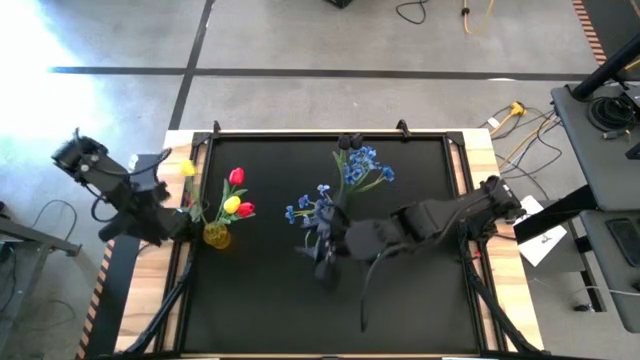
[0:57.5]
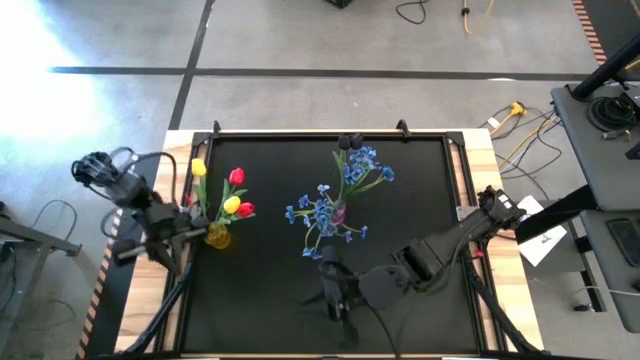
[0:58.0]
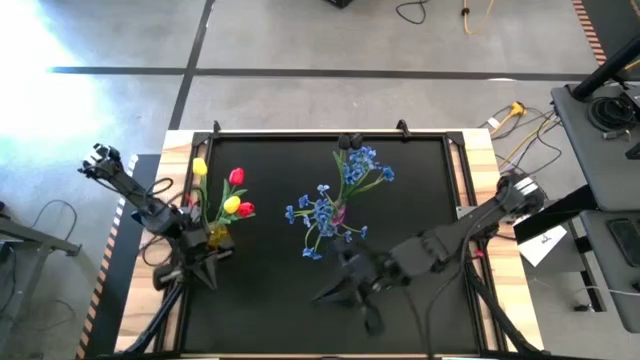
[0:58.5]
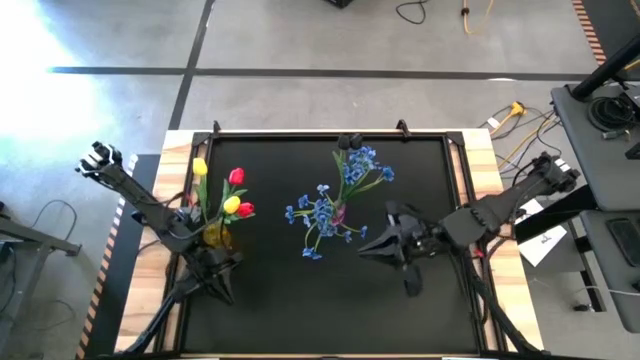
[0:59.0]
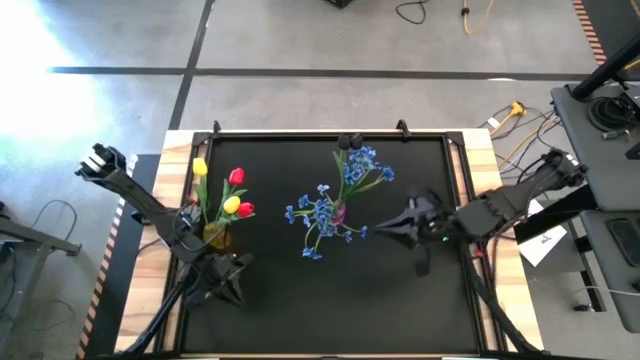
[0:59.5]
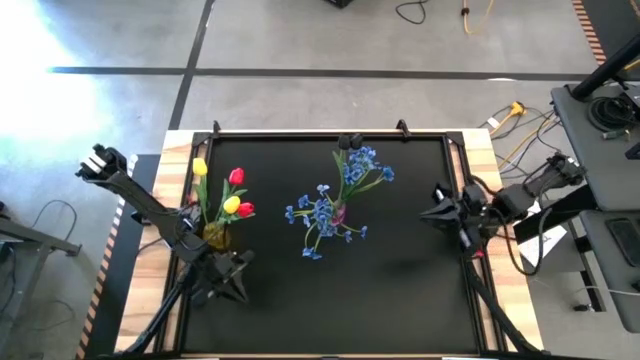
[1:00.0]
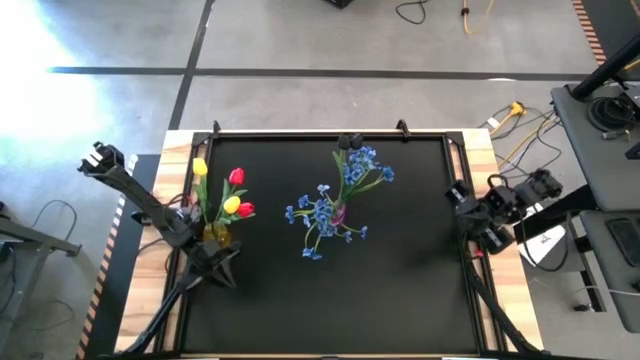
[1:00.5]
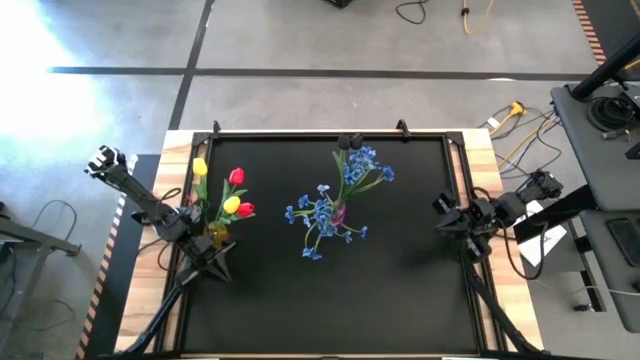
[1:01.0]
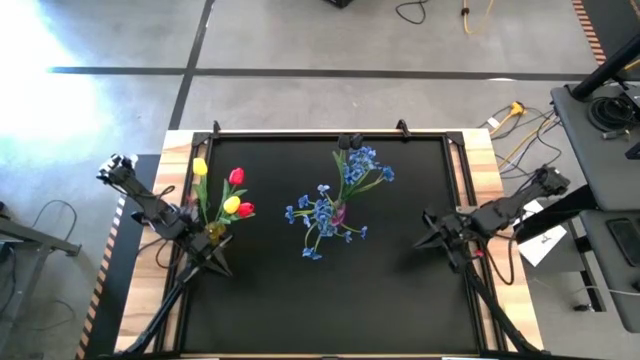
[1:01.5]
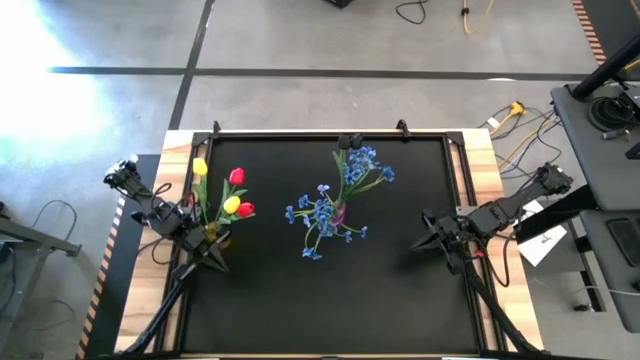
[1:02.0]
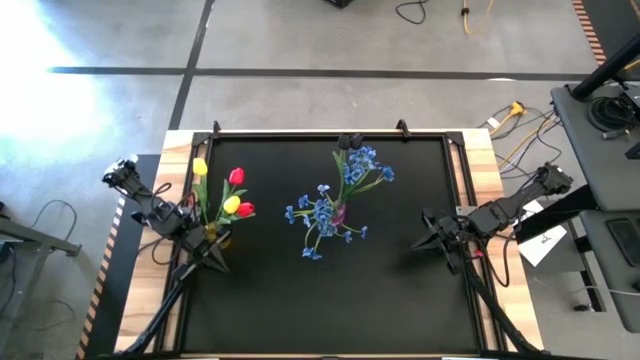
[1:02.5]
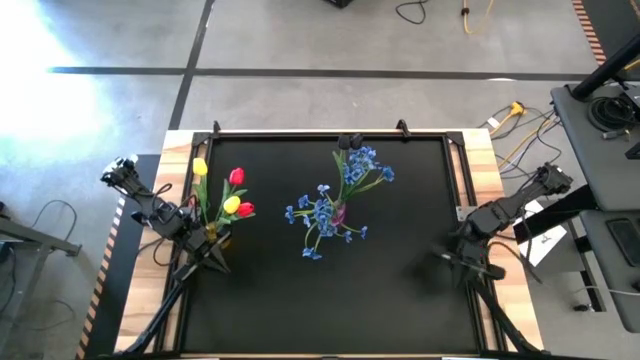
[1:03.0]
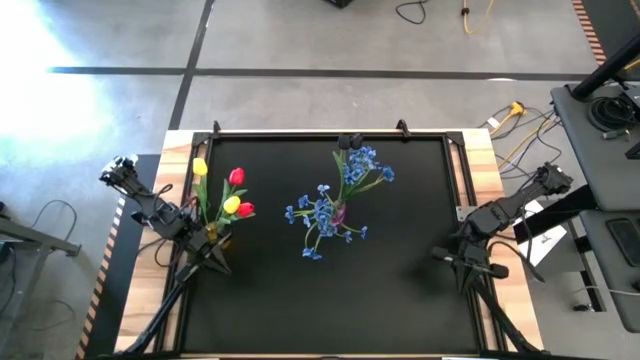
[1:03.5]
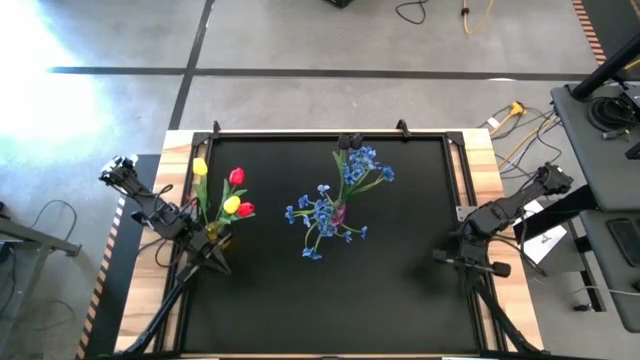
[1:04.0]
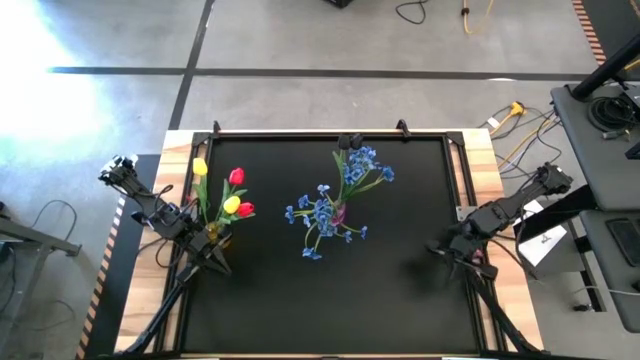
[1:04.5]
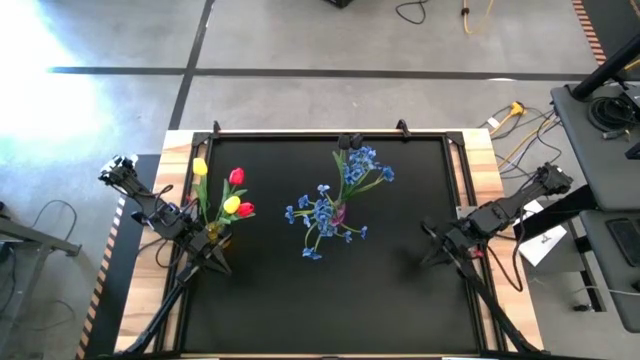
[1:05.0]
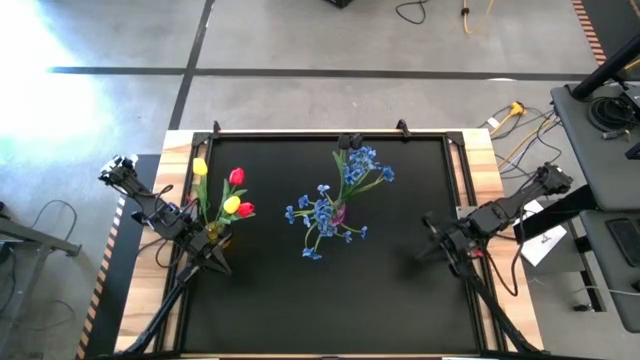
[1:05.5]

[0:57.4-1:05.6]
Task: Sort flowers into vase by color
Return to Home Position

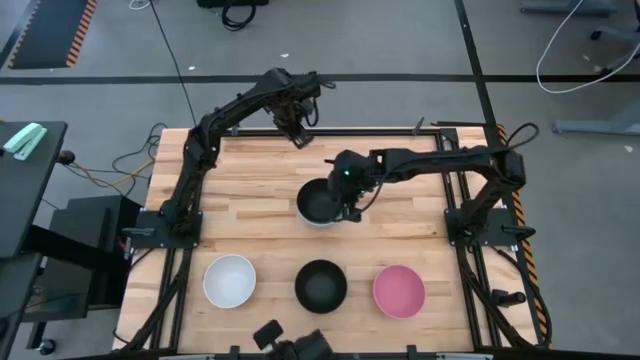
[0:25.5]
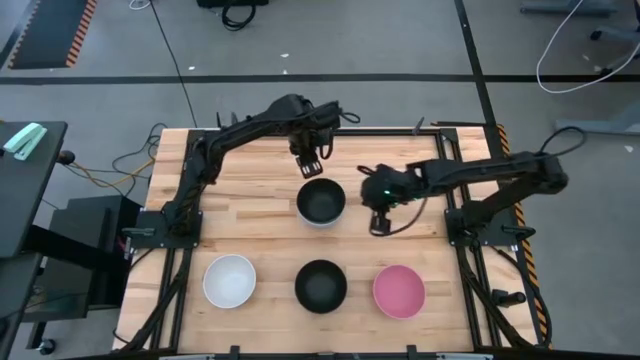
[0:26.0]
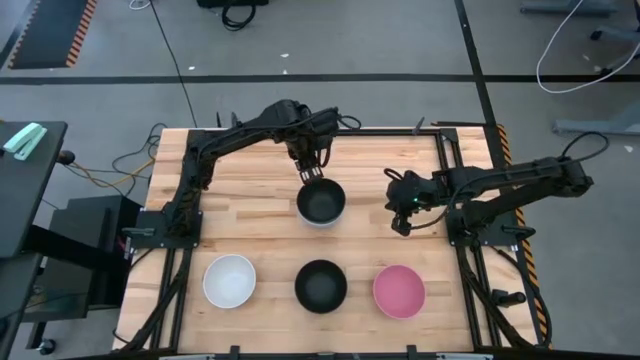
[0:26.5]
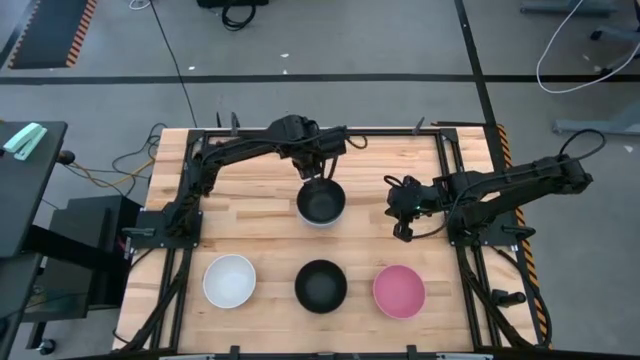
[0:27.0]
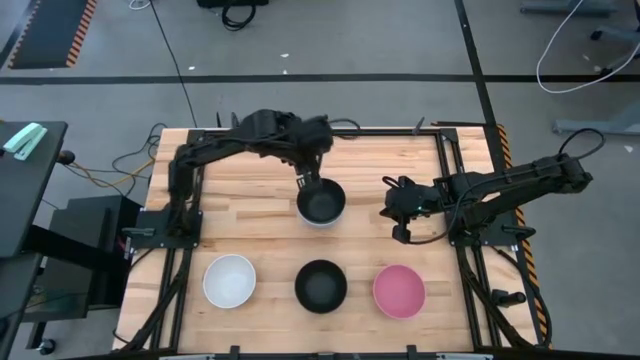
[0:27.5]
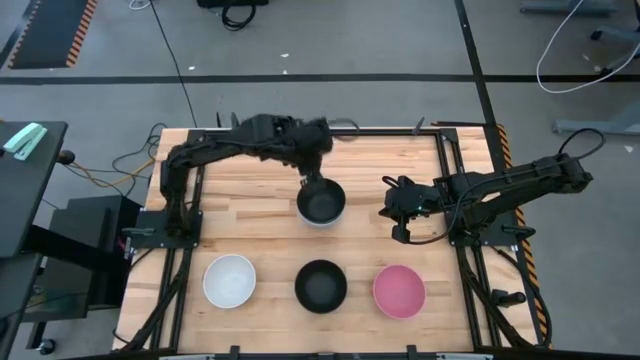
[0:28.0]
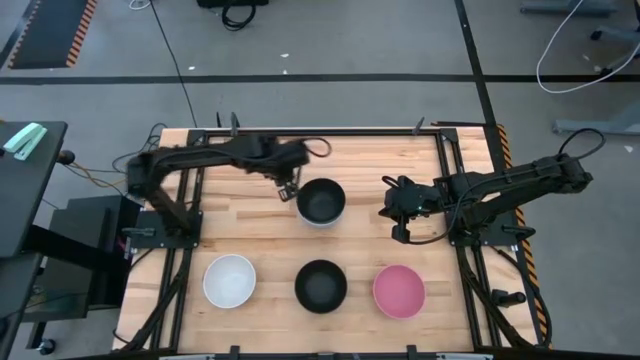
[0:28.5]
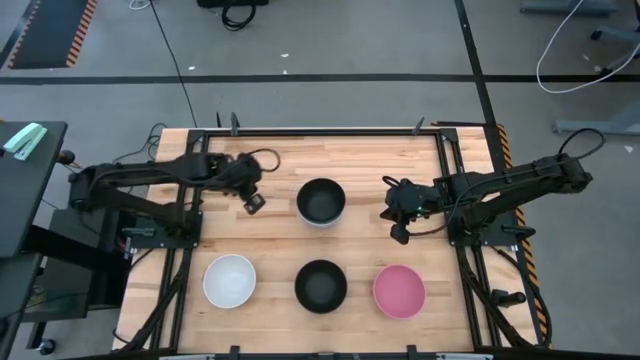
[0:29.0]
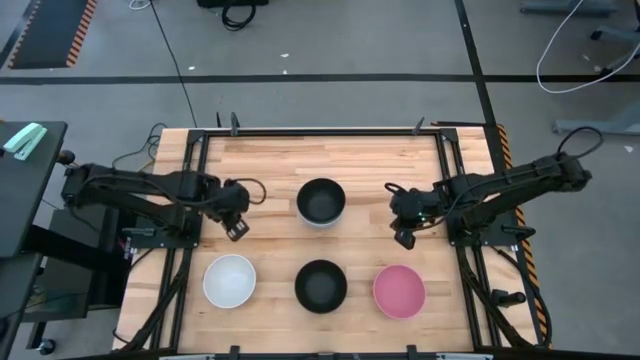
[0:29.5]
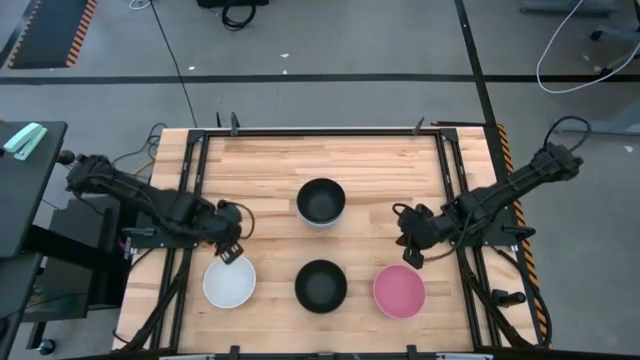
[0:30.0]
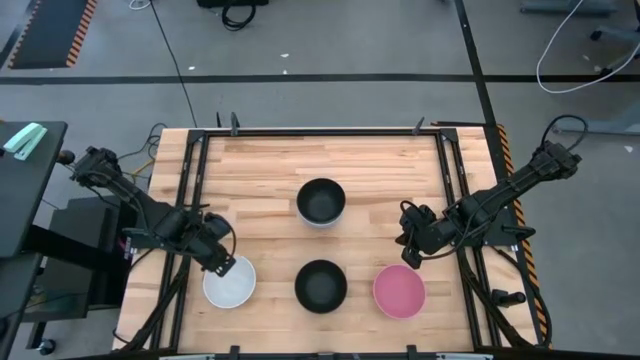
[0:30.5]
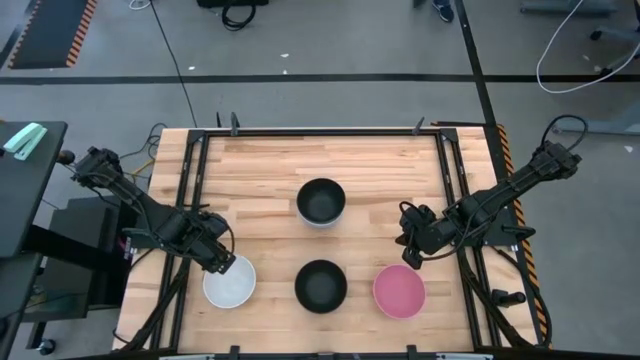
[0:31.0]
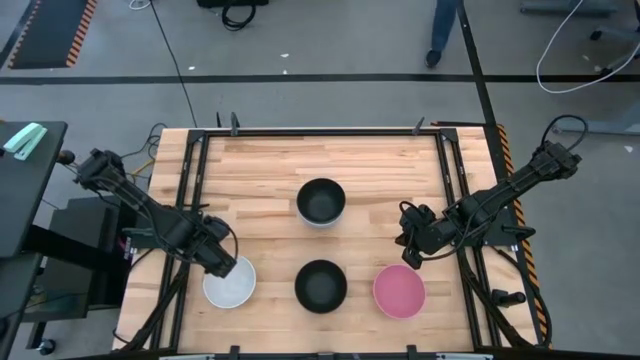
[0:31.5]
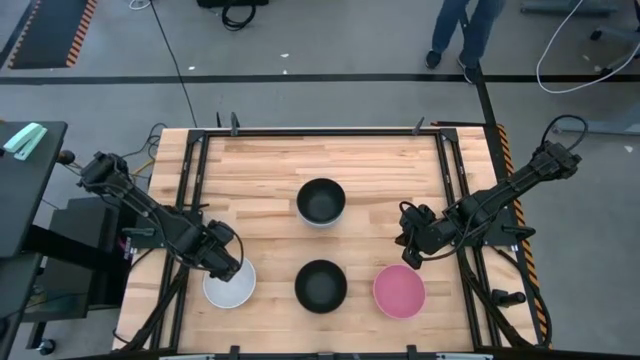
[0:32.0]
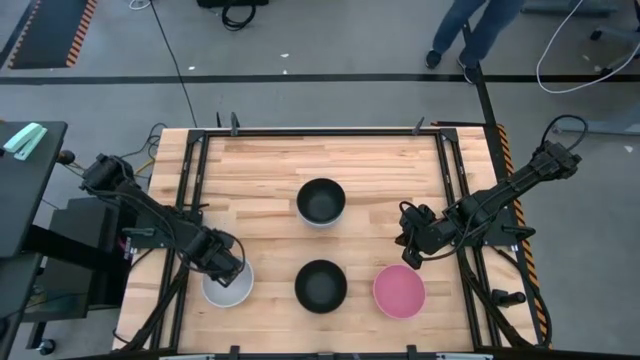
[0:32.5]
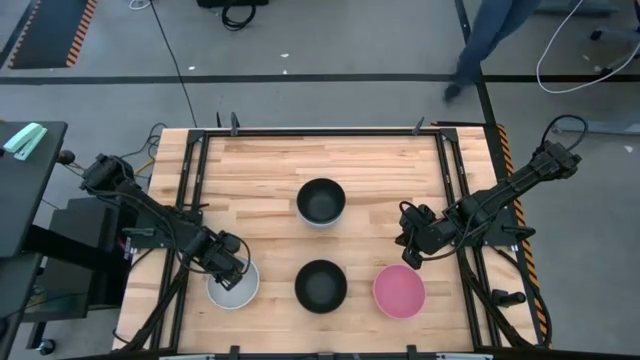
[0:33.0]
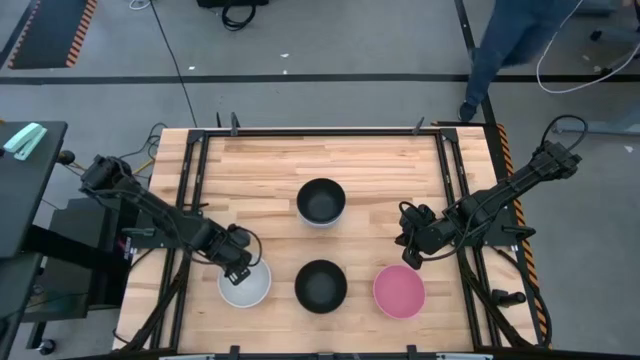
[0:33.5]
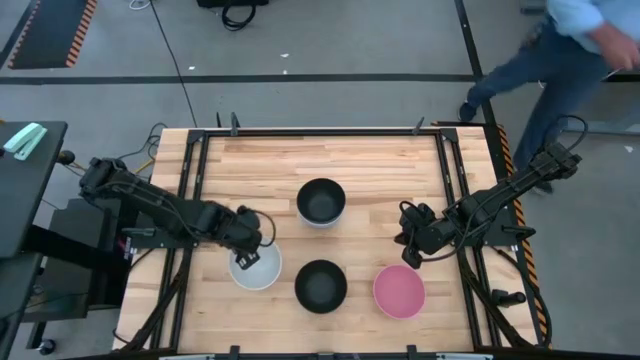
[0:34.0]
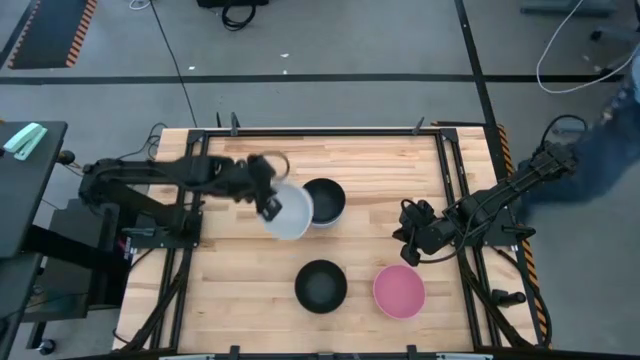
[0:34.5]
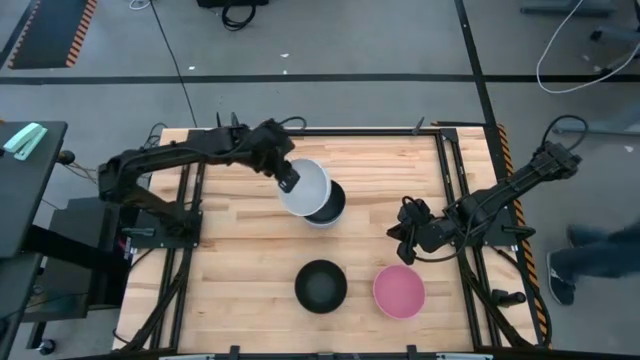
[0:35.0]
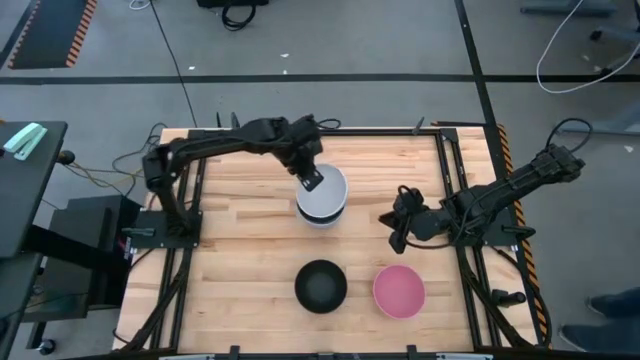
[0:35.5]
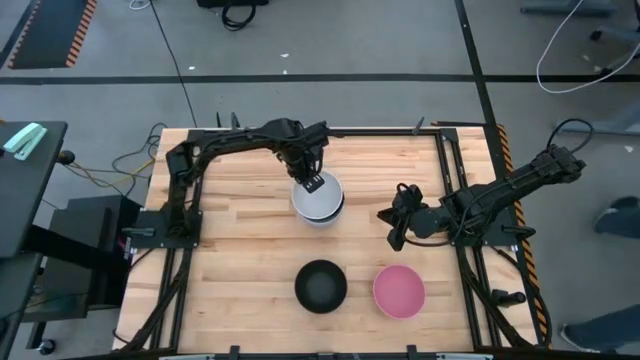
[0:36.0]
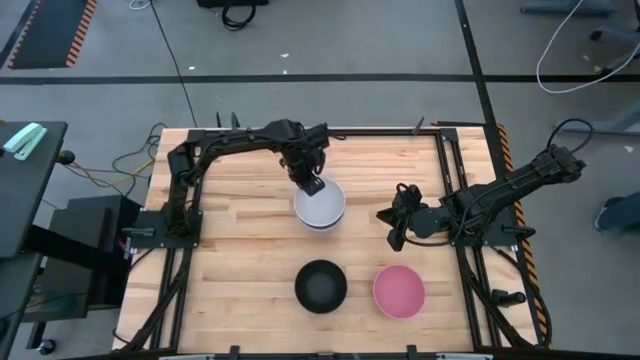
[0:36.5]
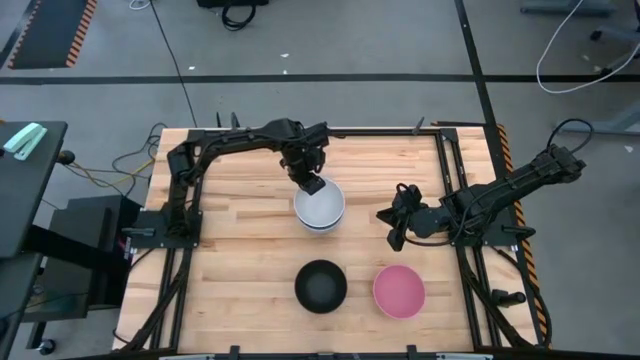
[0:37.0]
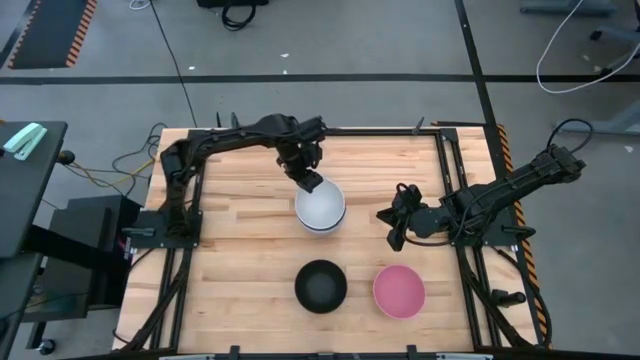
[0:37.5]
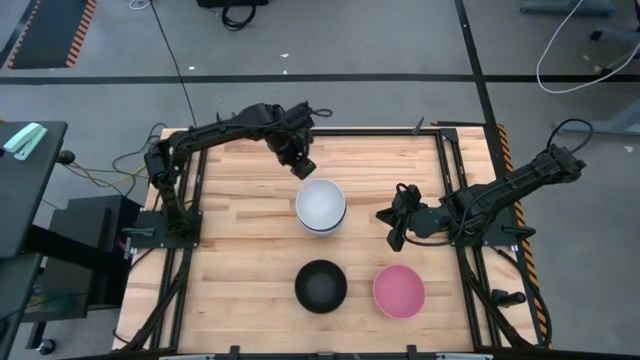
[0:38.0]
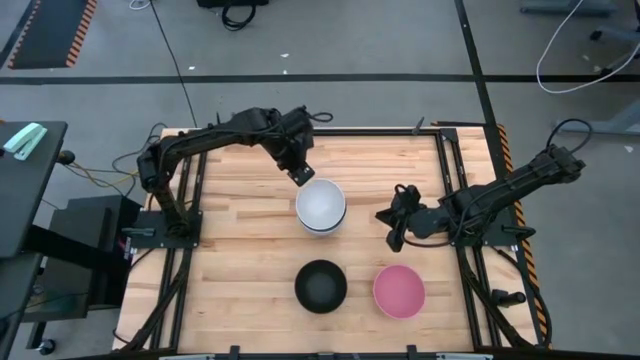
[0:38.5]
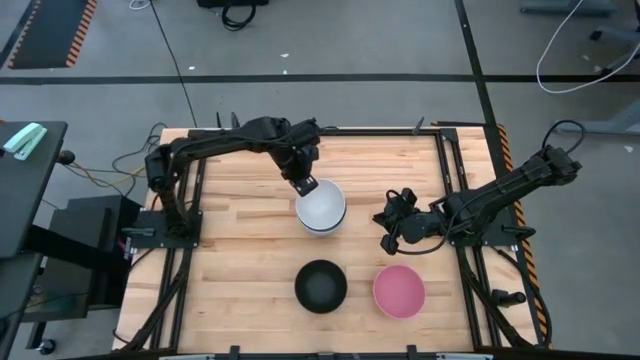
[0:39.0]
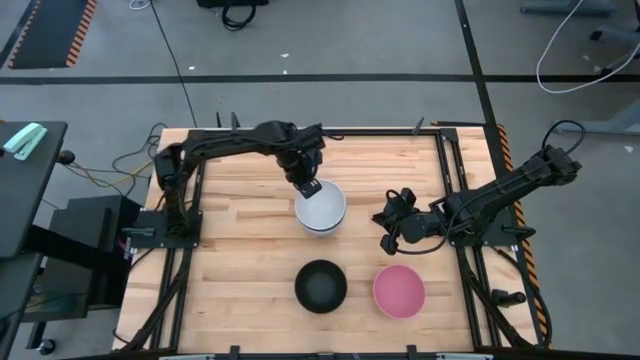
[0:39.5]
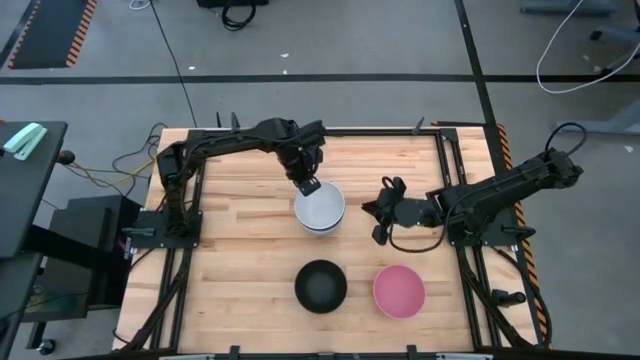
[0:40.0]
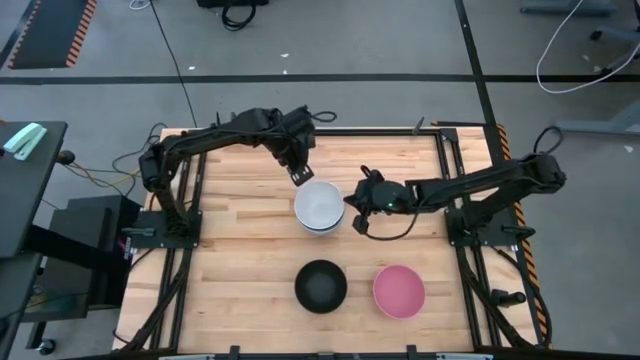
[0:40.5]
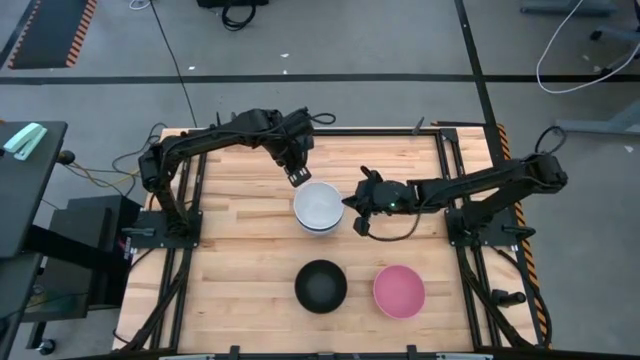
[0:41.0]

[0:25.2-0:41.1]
Task: Nest bowls inside each other
Stack the white bowl on top of the black bowl
